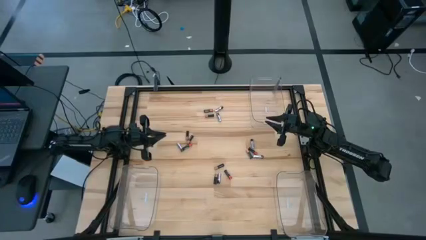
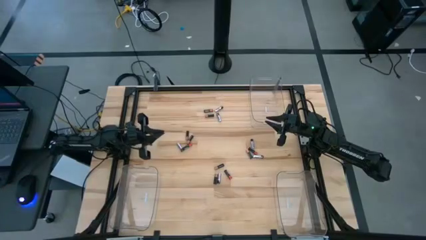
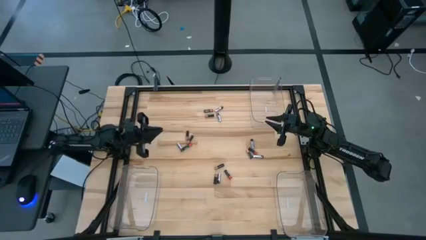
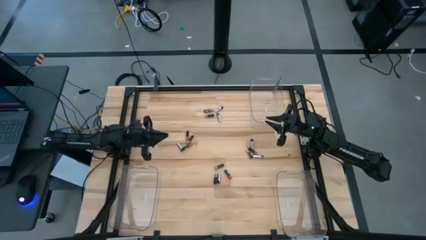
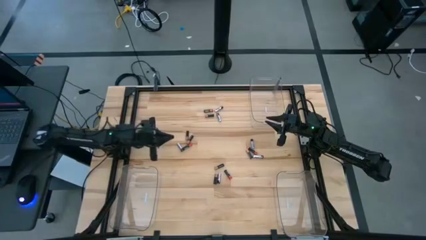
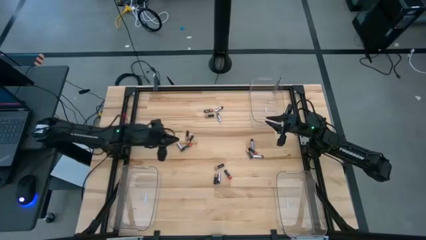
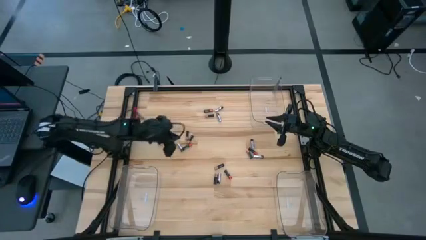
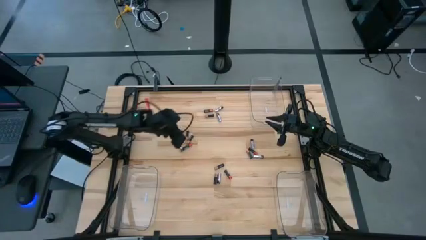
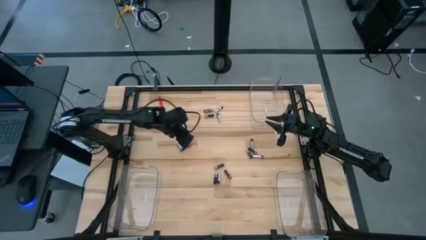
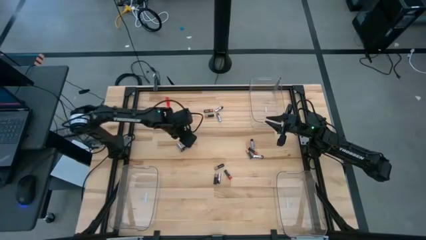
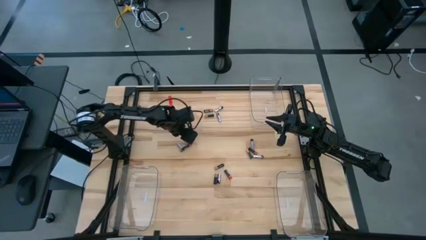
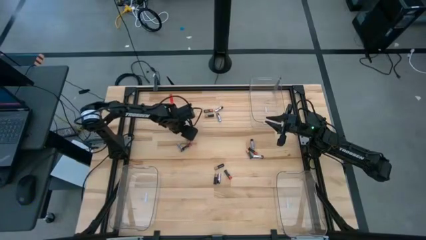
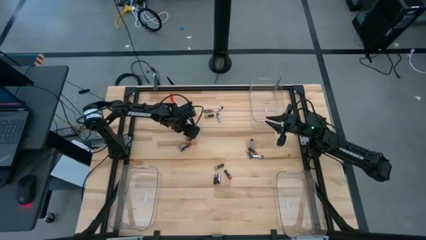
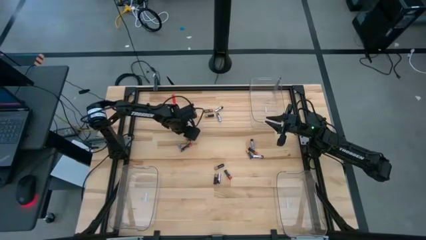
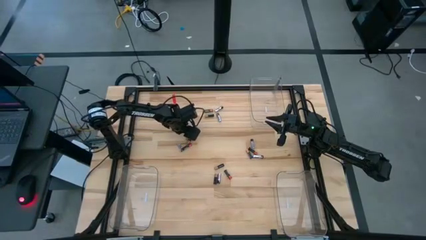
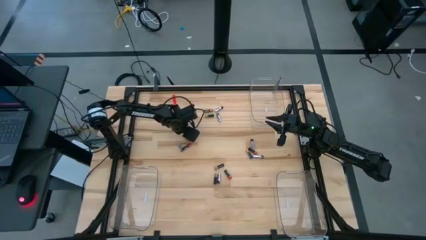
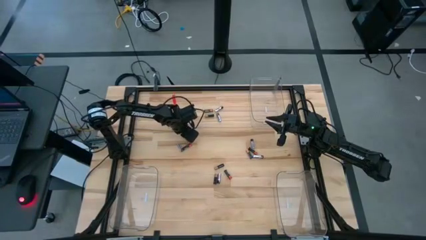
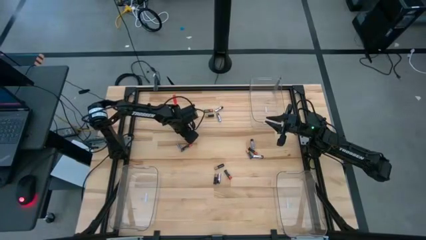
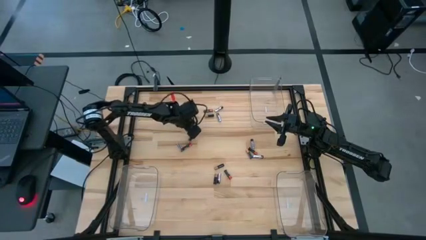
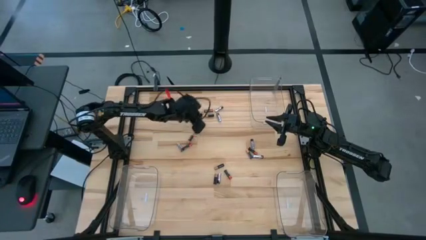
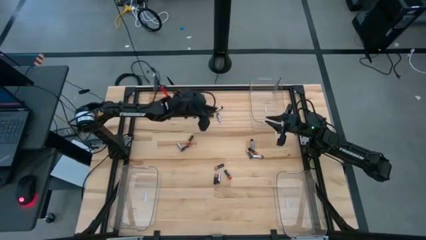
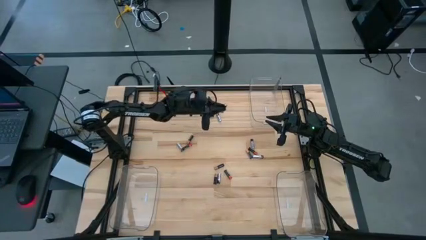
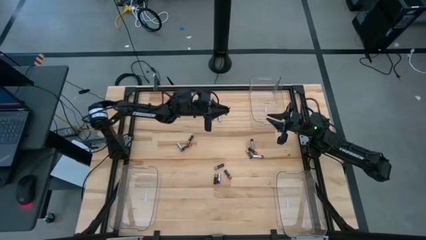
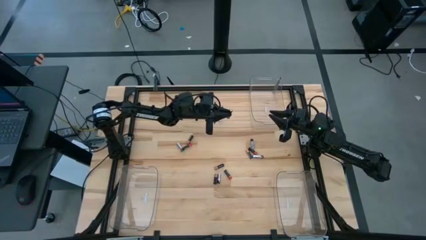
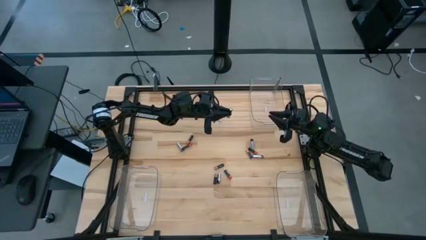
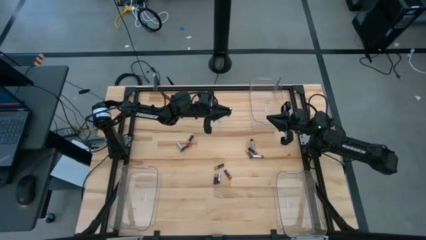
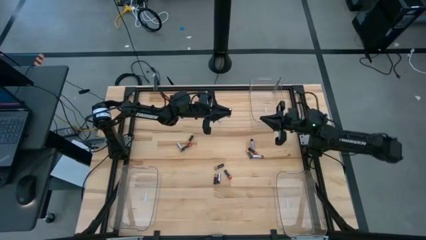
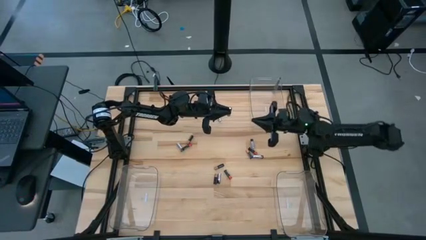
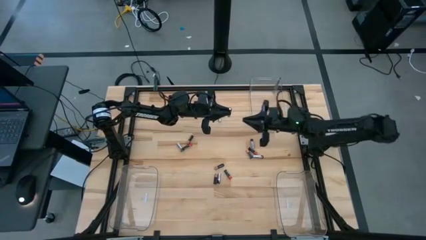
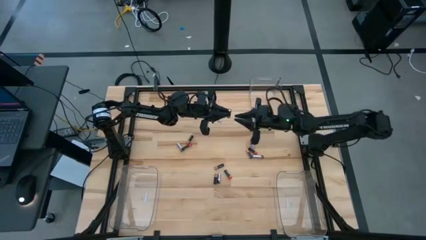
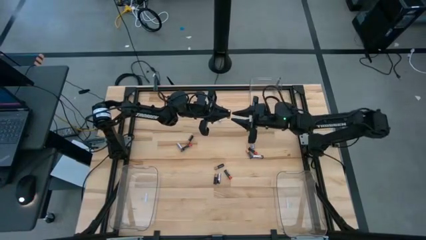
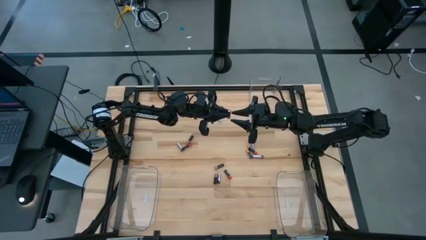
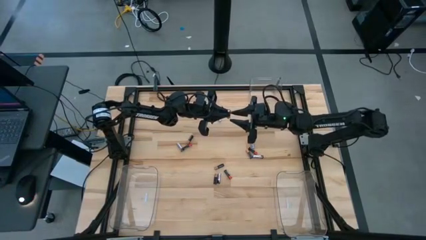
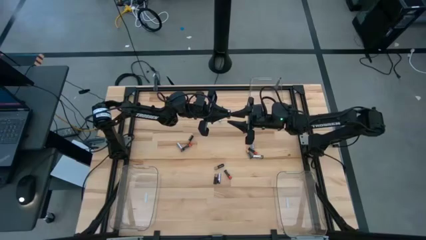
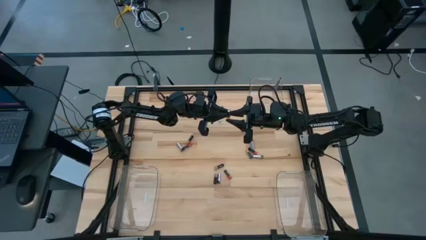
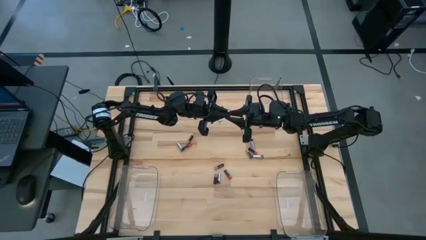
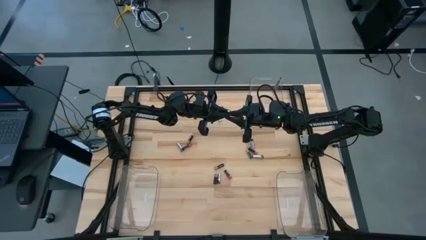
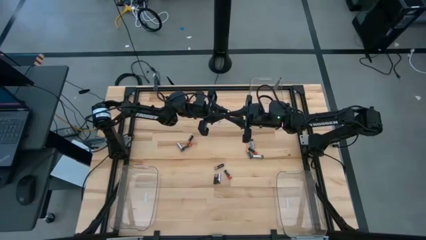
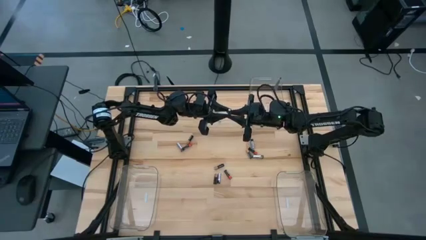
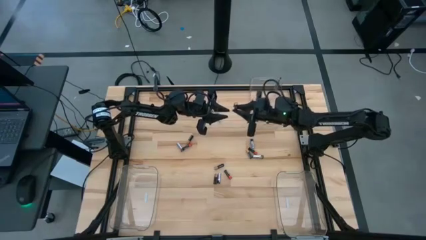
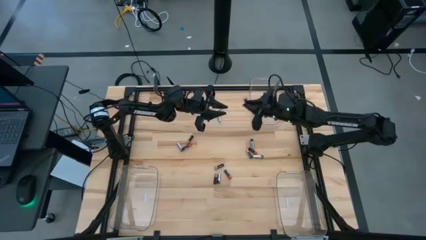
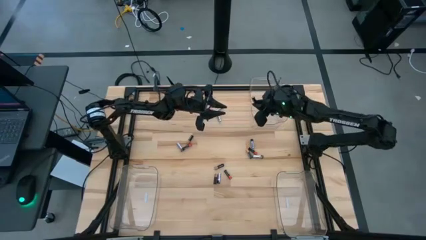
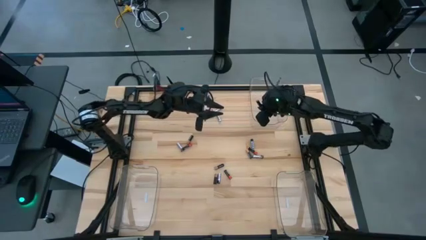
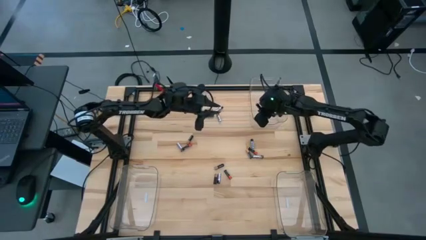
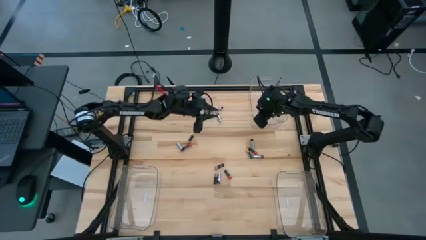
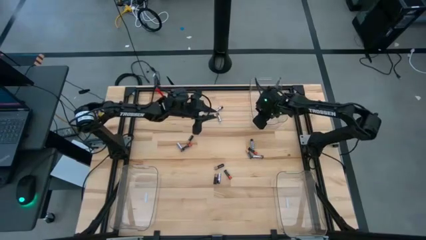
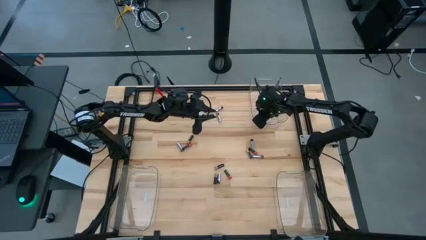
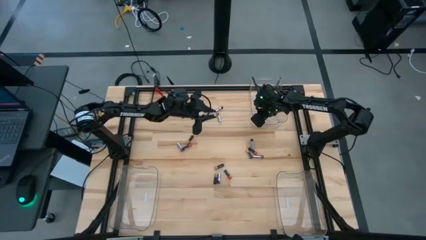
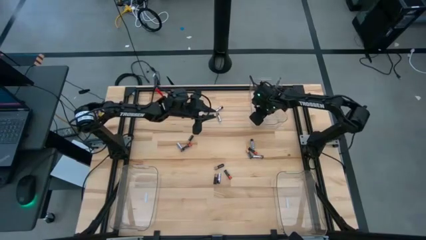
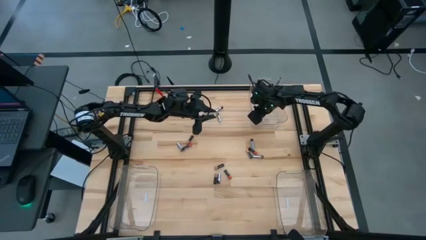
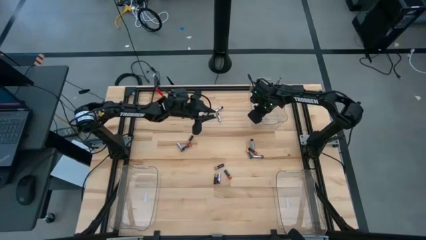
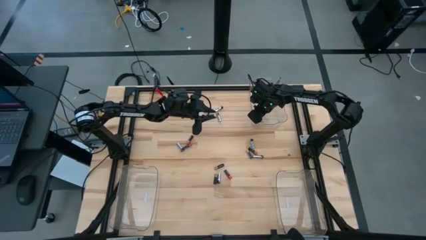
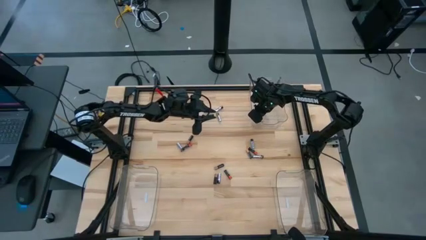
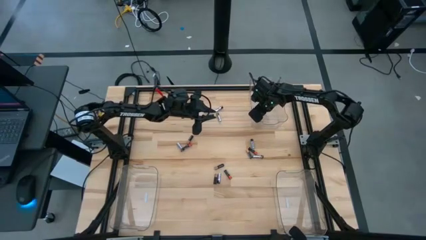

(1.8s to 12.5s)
Task: Sort batteries
Put the brown battery into the top transparent bin

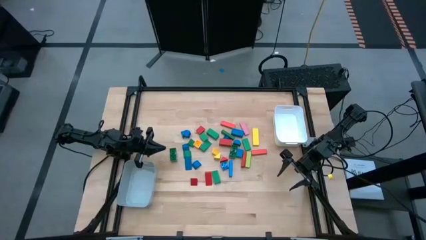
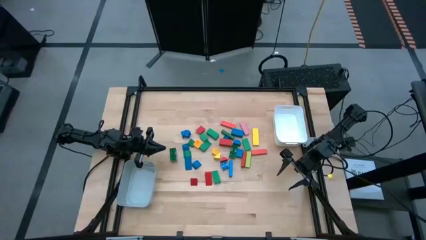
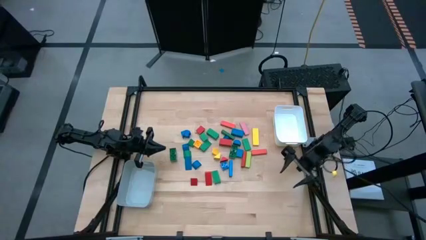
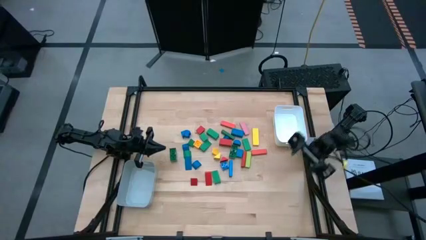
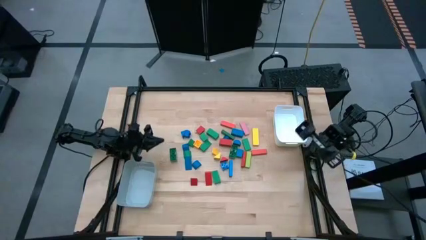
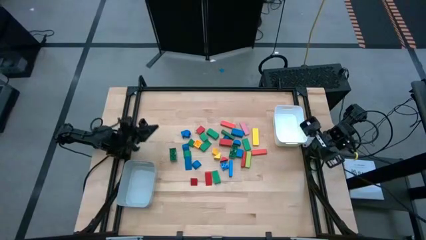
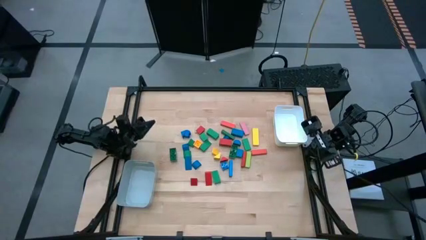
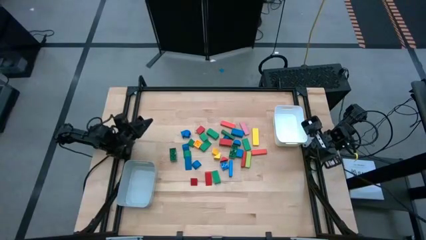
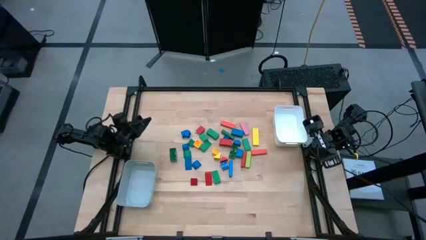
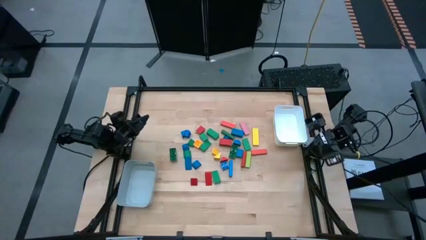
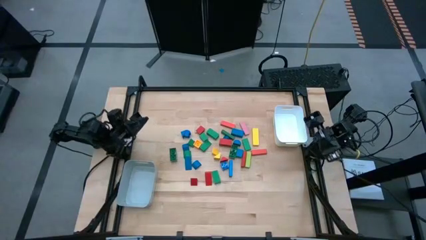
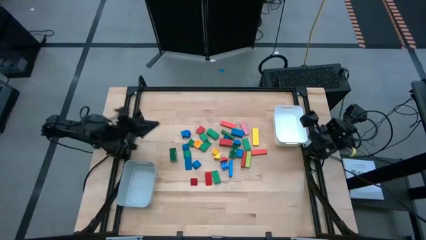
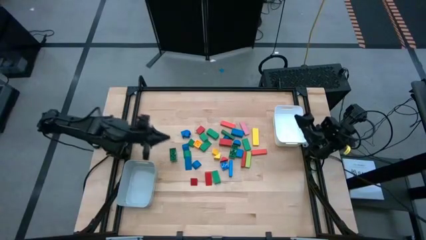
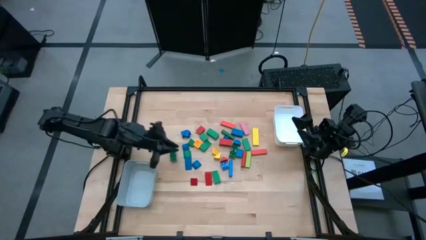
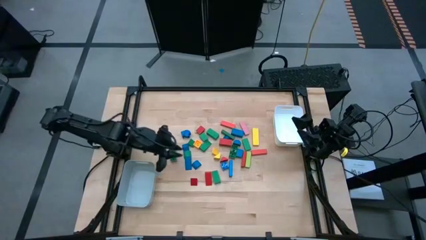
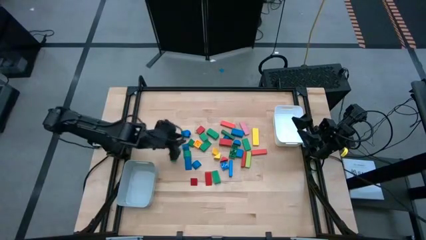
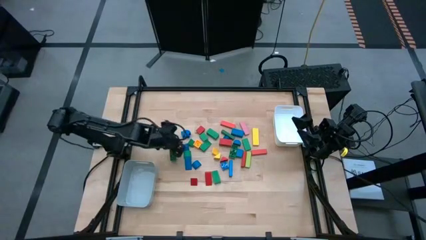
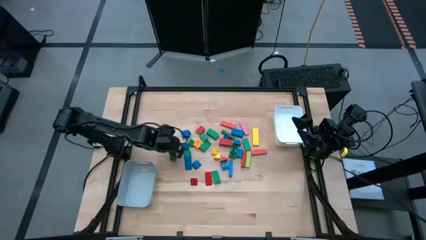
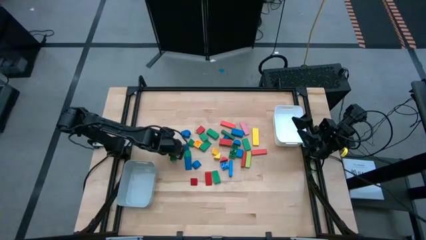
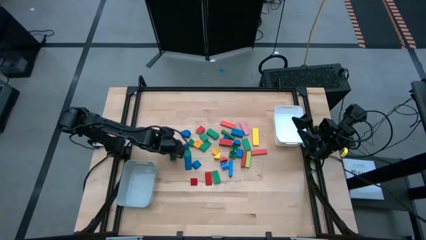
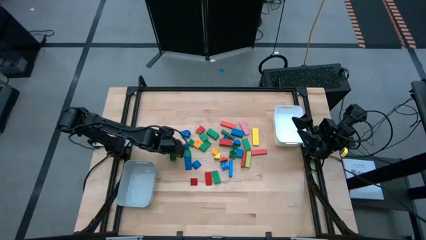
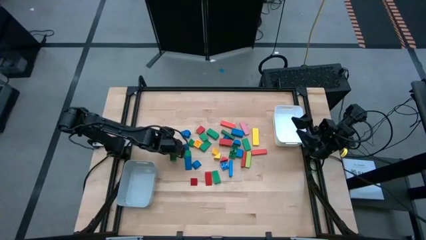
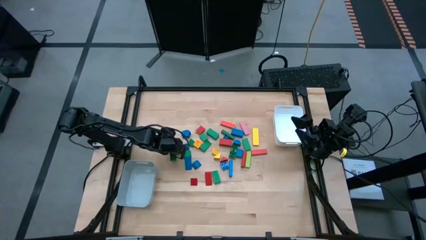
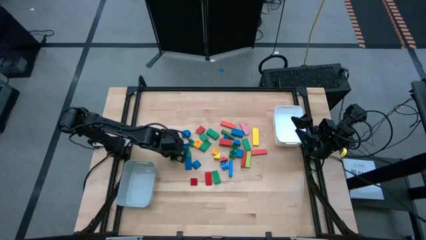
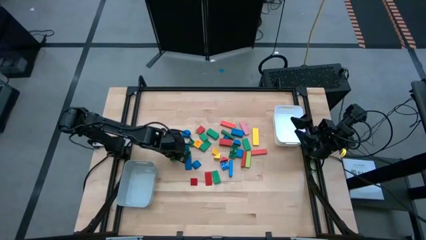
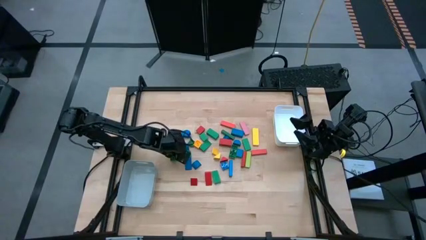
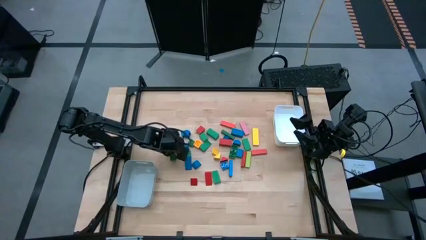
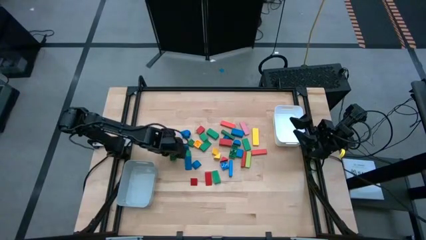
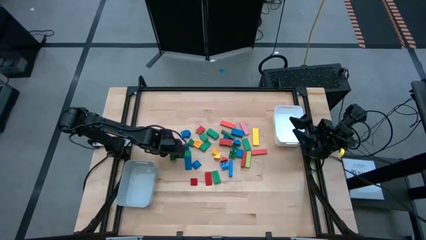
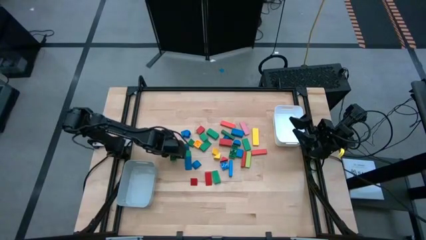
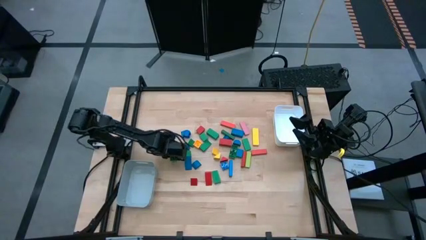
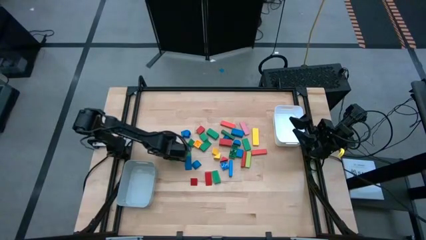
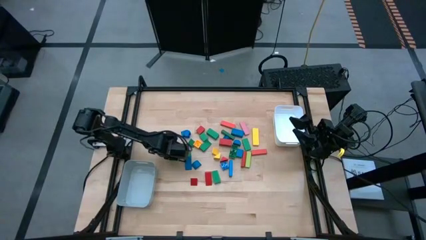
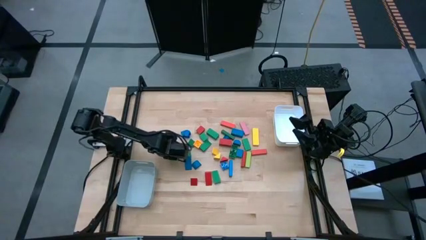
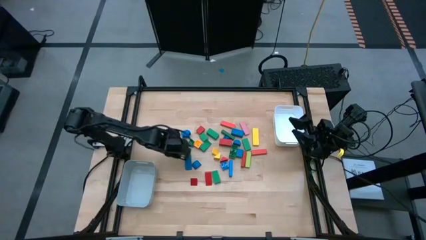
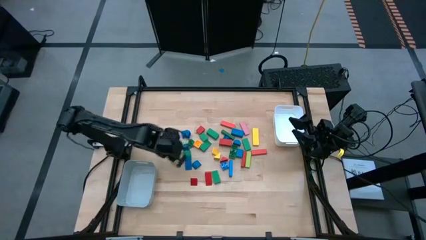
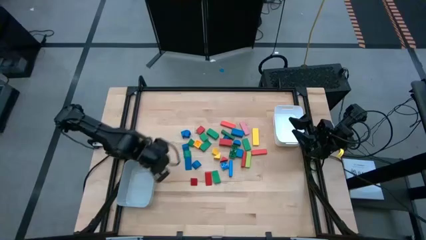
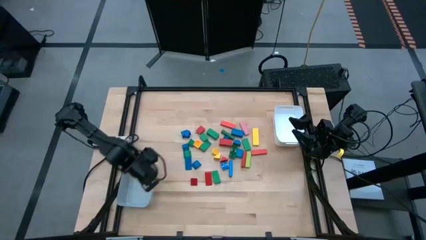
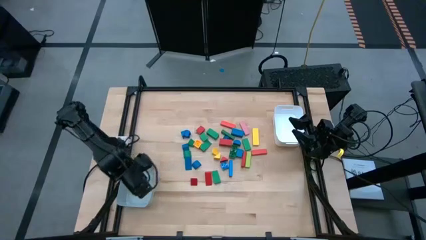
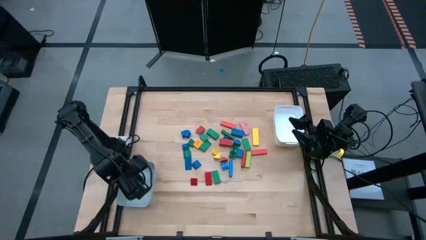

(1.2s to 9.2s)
Task: Sort blocks by size
Put the green game piece into the gray bin
